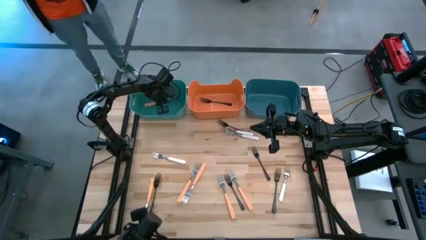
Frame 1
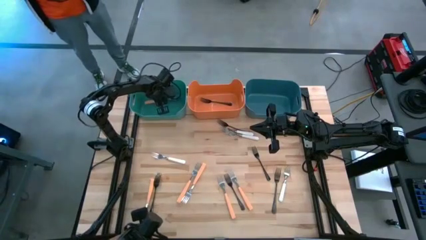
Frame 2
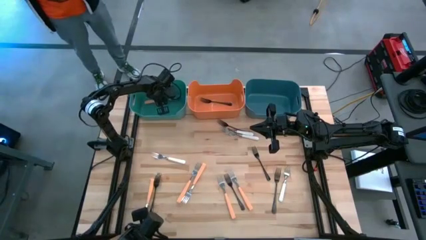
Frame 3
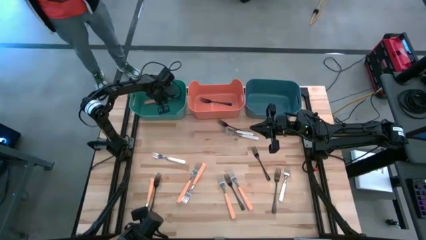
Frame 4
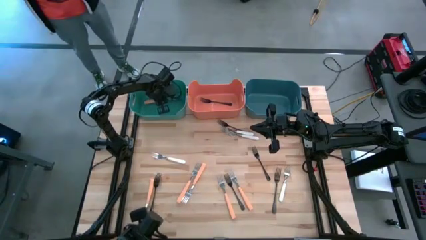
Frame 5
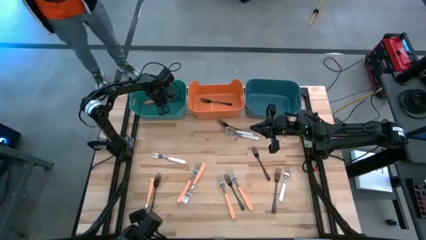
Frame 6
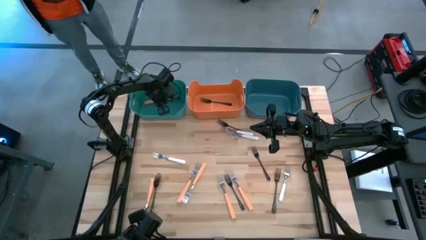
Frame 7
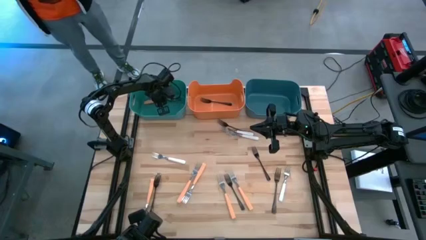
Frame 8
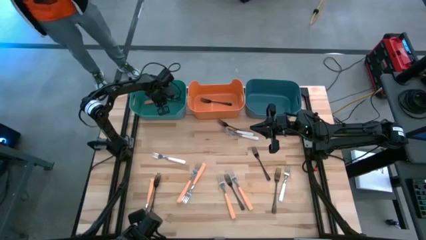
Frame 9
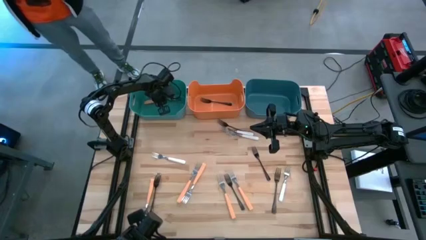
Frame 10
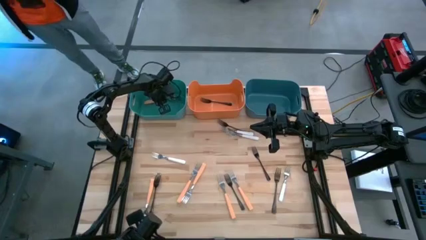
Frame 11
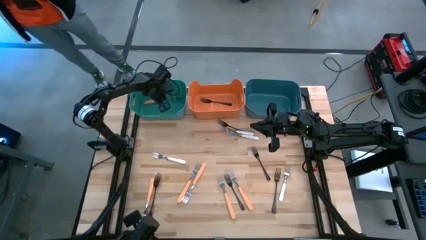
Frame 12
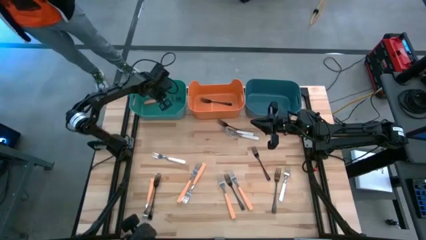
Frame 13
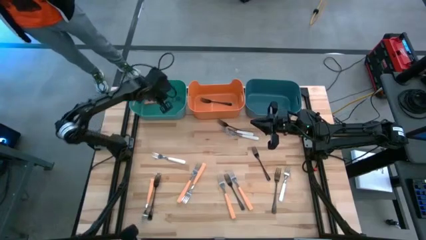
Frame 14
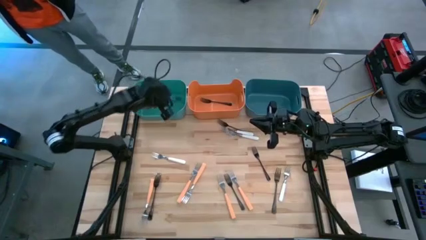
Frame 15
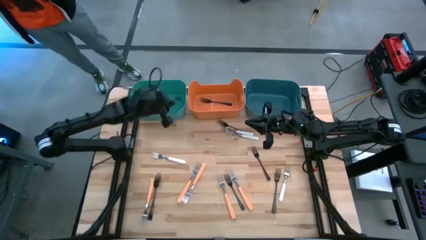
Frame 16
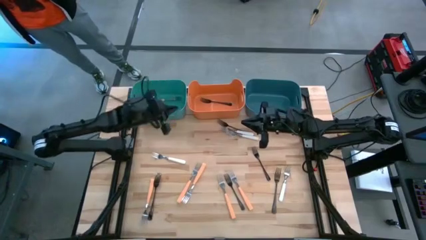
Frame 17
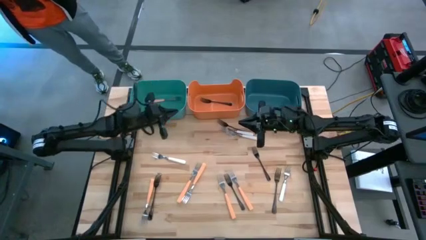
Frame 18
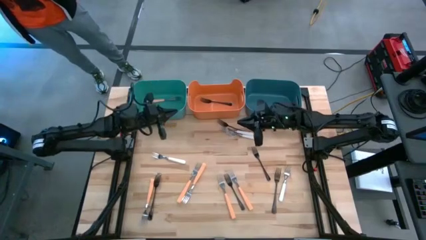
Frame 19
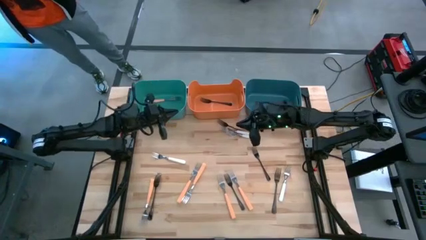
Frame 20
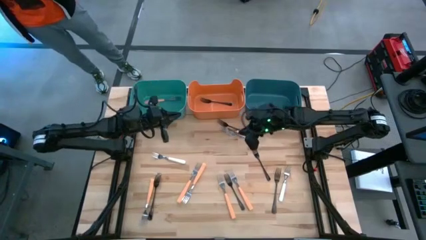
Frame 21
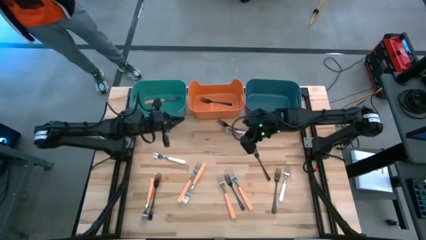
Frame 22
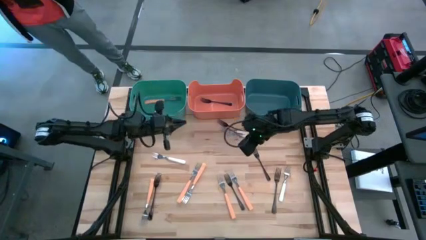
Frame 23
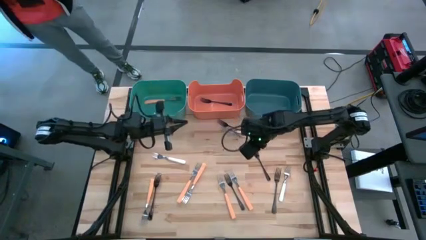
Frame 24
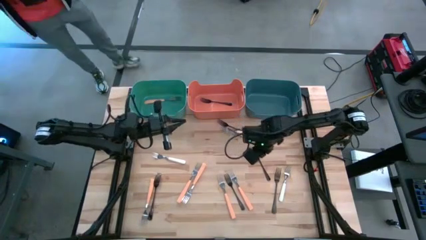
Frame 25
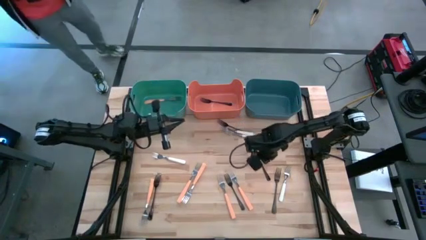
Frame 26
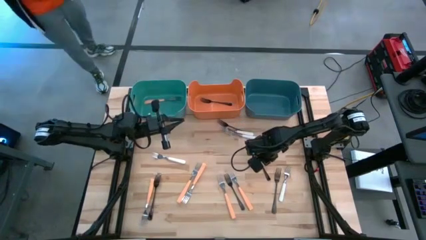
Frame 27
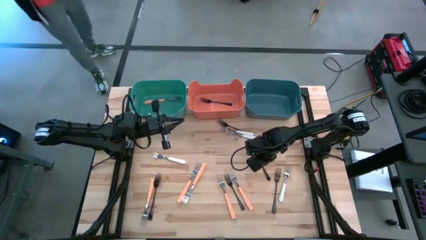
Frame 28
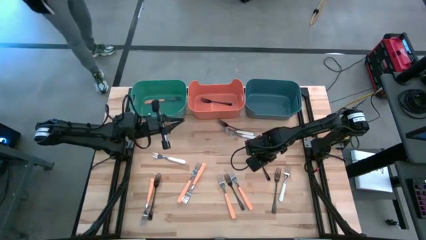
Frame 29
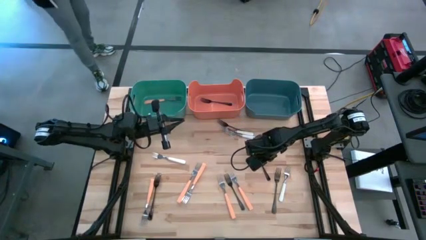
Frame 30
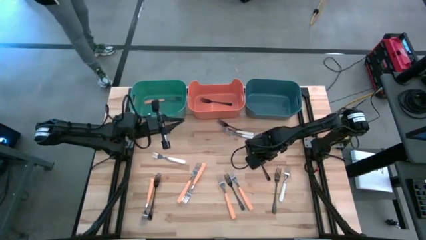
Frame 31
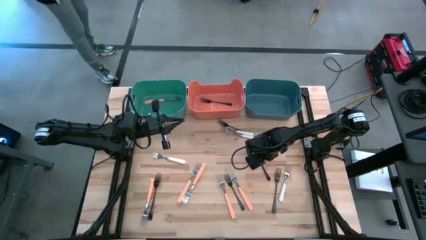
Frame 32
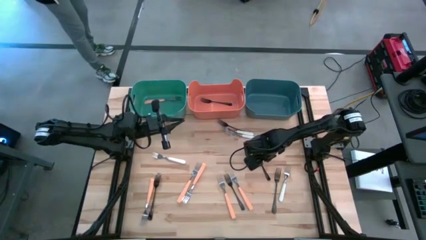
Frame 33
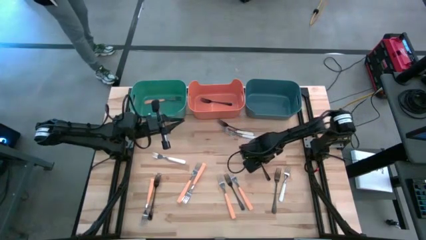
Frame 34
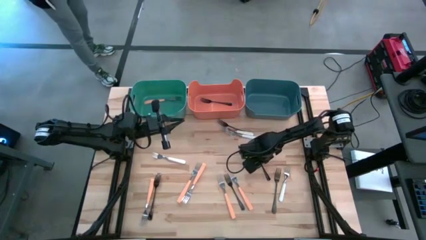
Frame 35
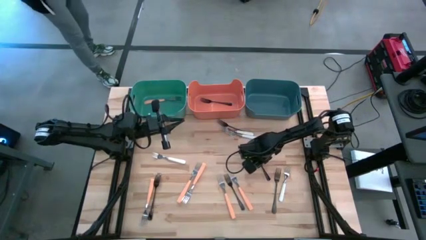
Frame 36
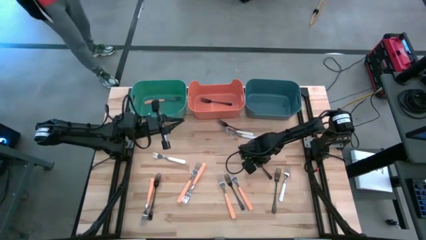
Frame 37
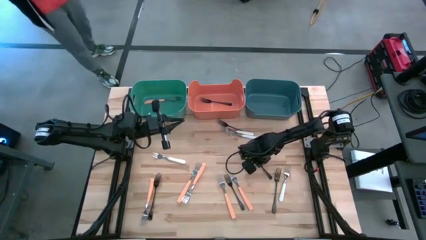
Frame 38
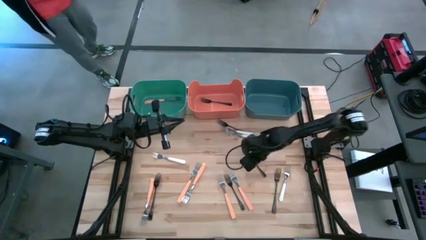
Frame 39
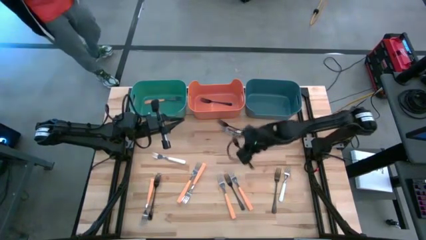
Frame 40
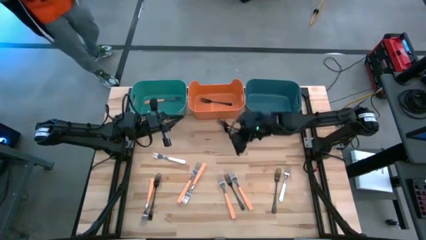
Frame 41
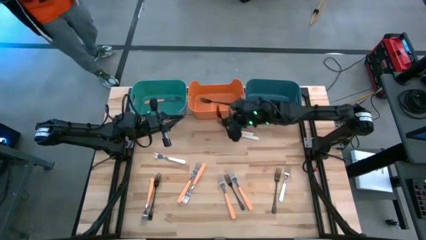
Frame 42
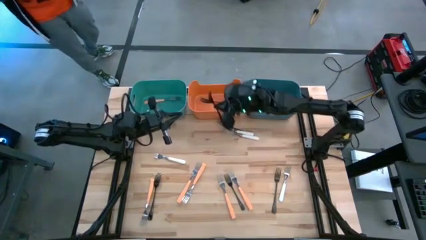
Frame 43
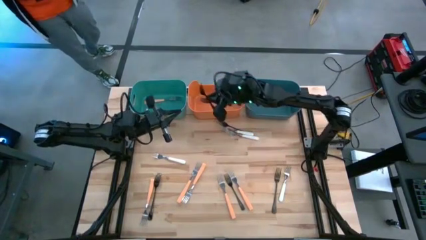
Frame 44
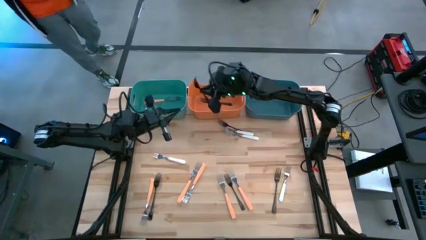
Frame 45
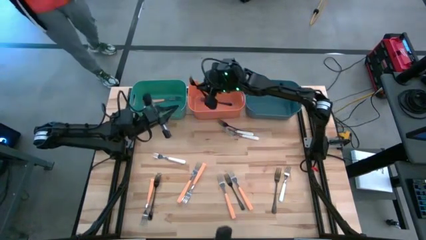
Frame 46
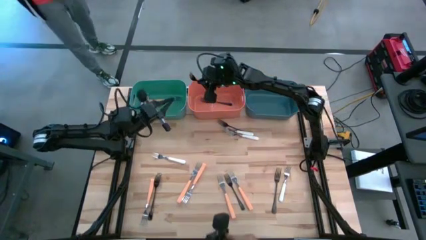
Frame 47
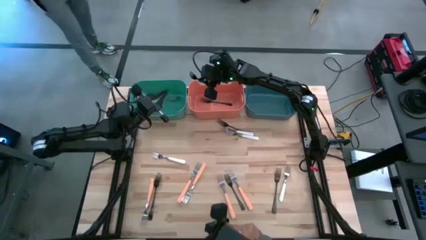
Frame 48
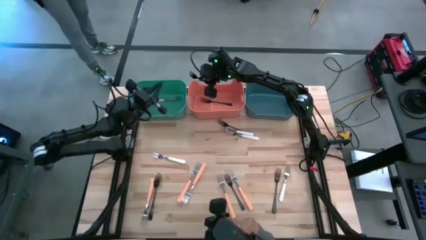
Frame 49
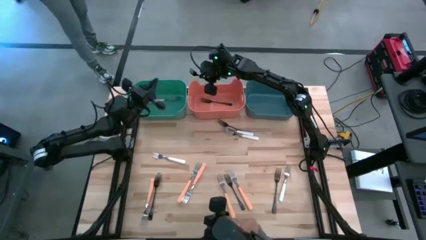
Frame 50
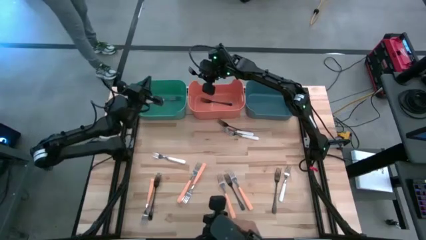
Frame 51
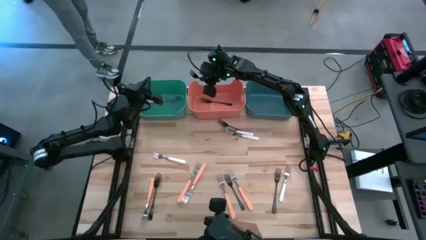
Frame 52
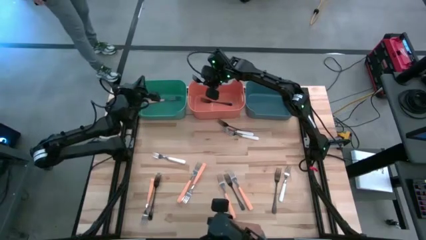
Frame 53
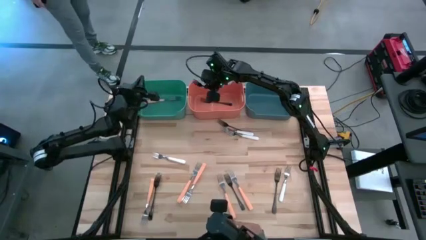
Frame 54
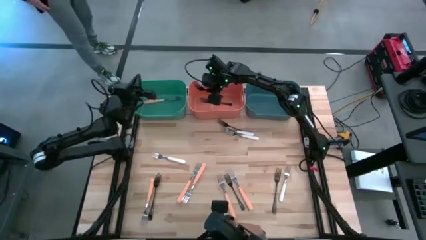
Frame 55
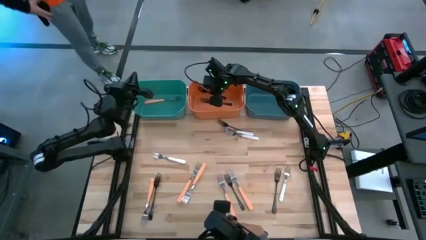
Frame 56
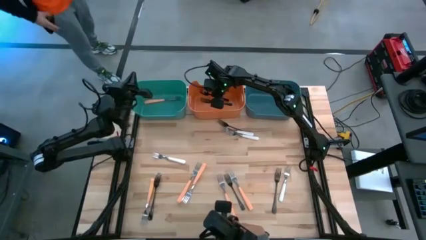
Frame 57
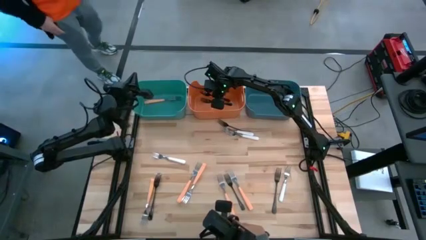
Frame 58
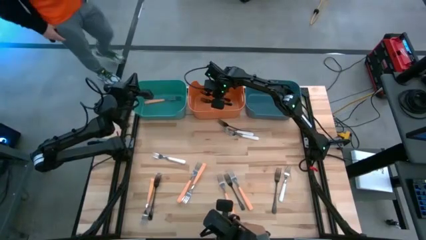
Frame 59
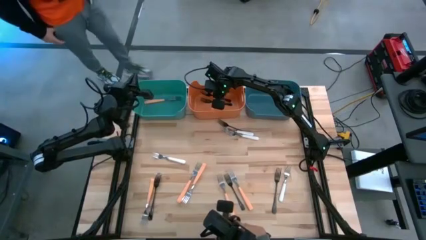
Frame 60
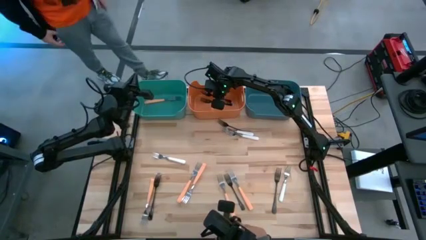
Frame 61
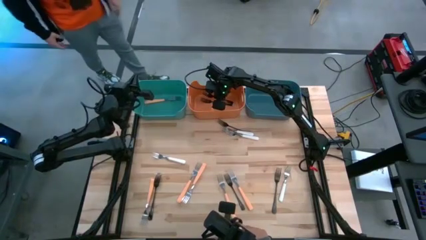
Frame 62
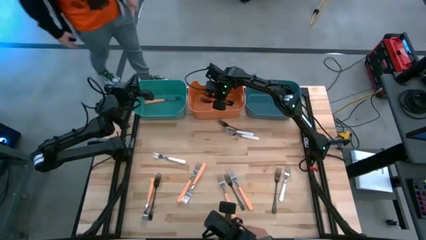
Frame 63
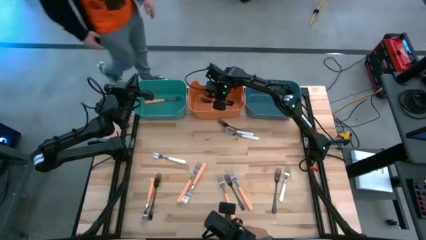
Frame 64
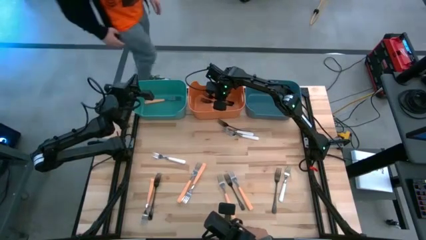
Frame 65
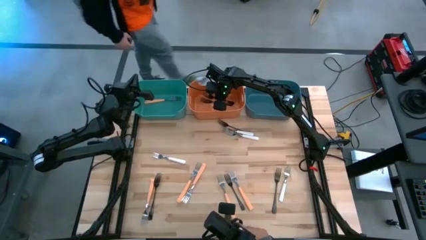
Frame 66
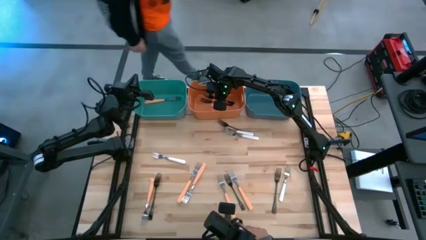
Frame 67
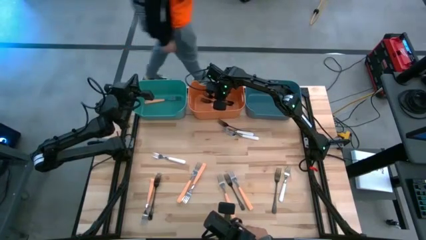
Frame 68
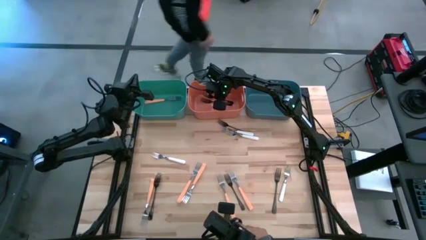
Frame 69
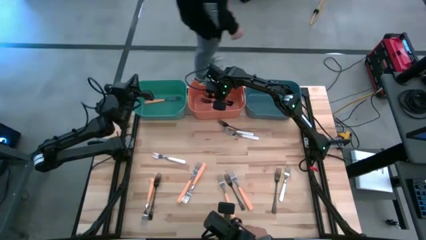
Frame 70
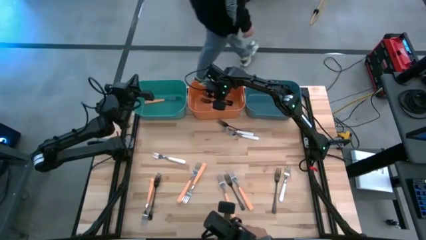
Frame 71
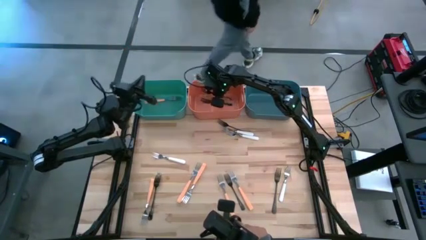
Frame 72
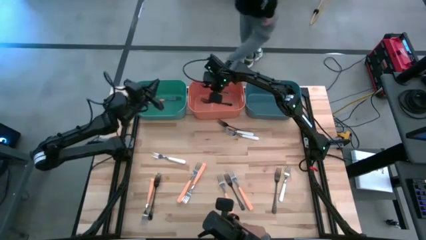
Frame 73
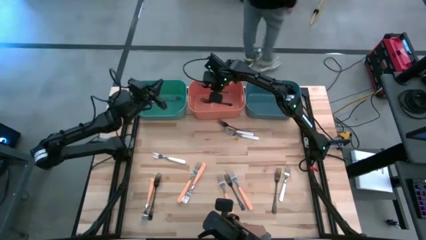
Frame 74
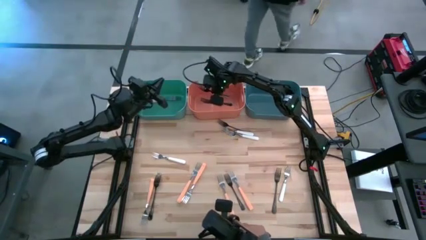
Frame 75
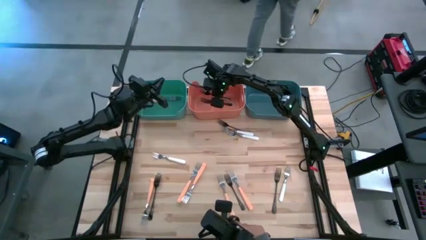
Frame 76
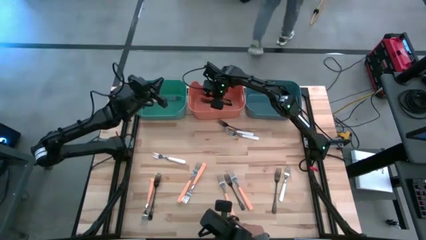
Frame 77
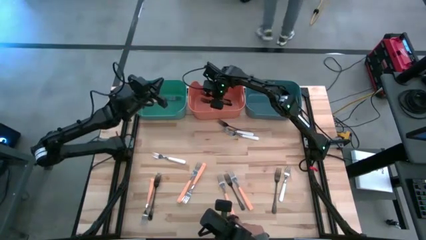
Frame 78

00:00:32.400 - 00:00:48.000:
Task: Sort silverware by color (type)
Put the black fork into the orange bin
